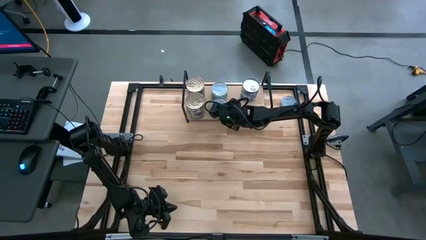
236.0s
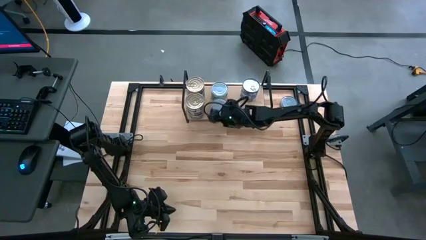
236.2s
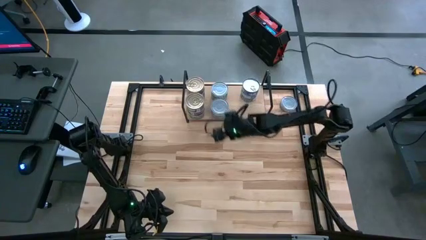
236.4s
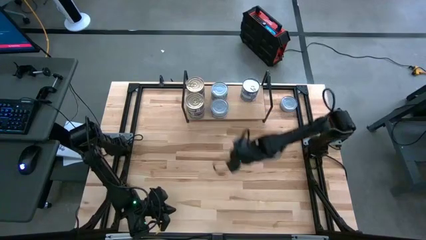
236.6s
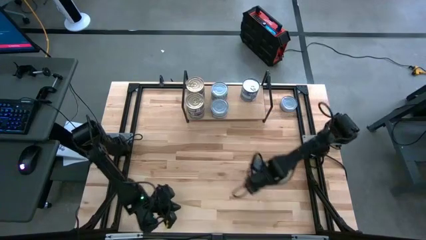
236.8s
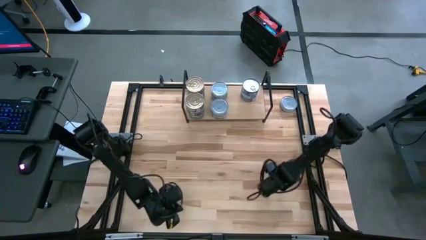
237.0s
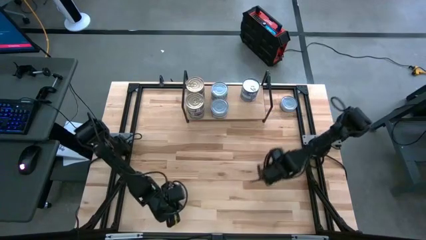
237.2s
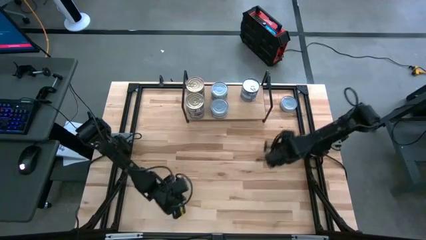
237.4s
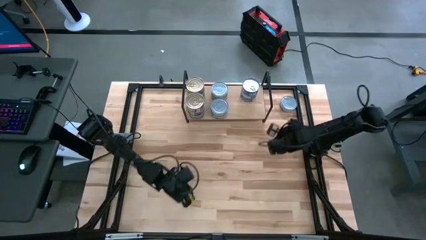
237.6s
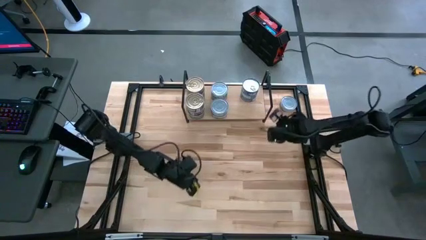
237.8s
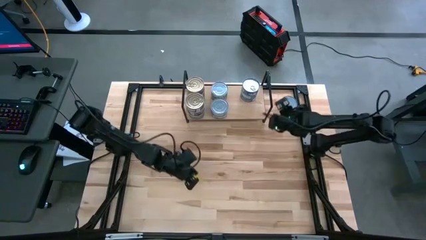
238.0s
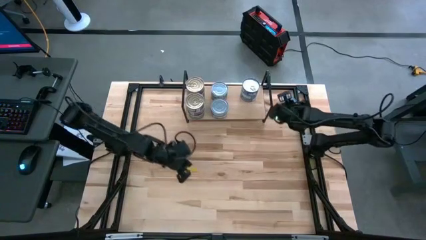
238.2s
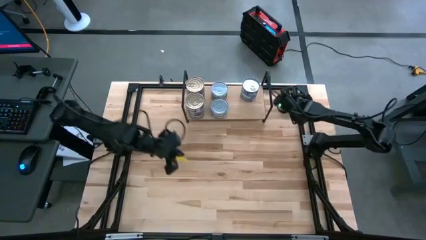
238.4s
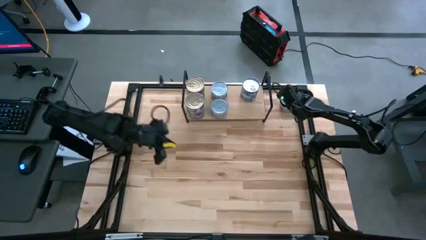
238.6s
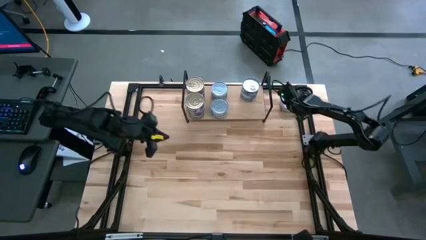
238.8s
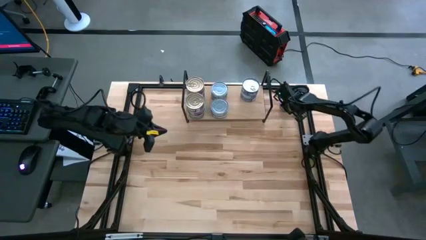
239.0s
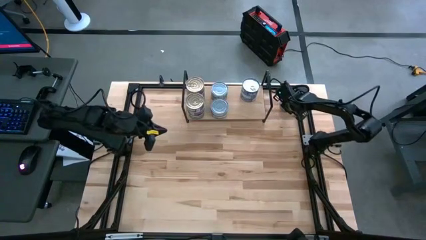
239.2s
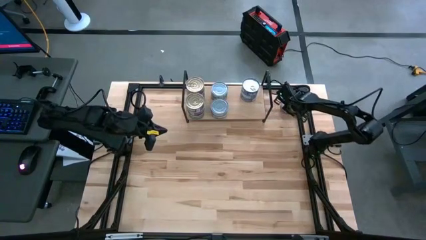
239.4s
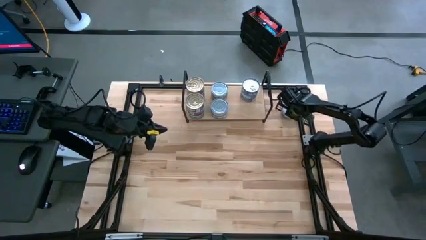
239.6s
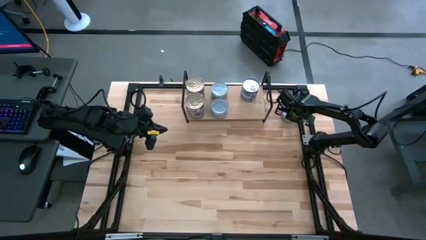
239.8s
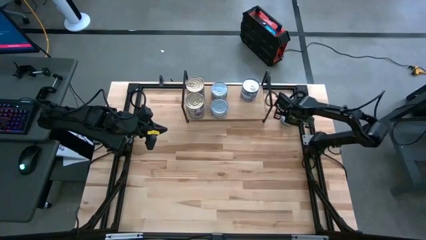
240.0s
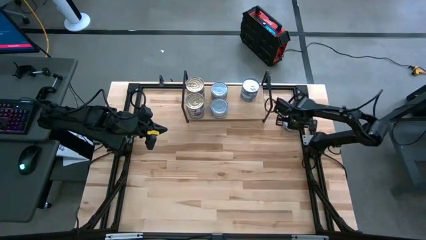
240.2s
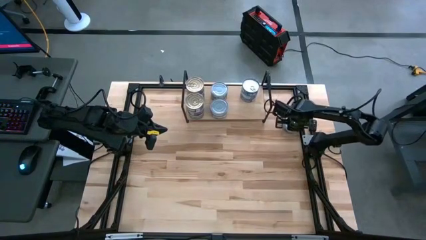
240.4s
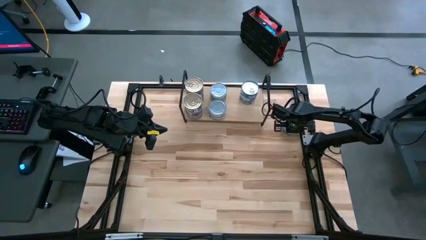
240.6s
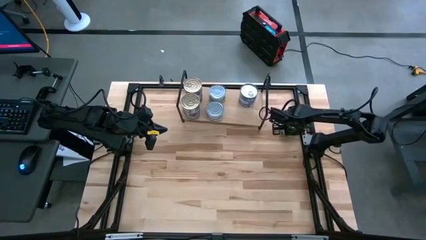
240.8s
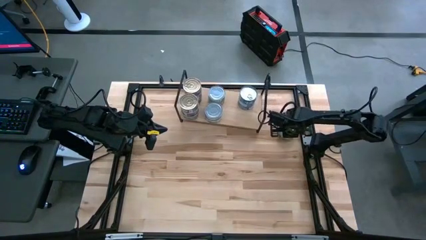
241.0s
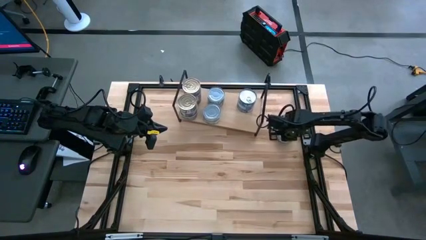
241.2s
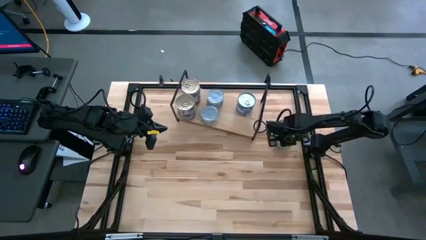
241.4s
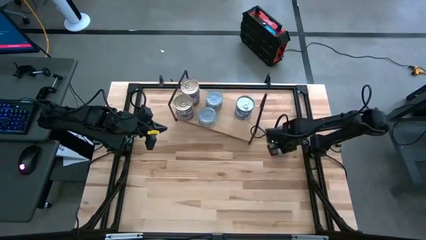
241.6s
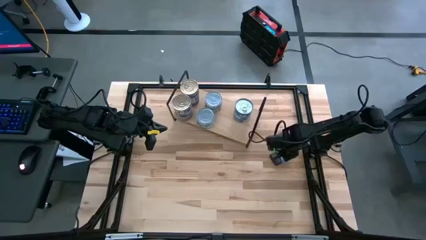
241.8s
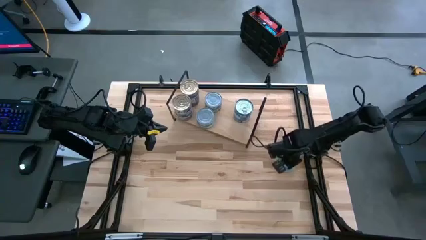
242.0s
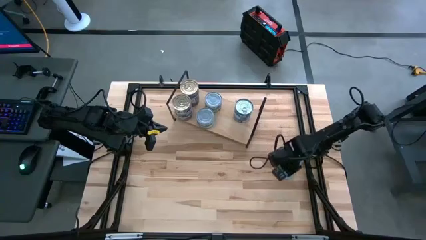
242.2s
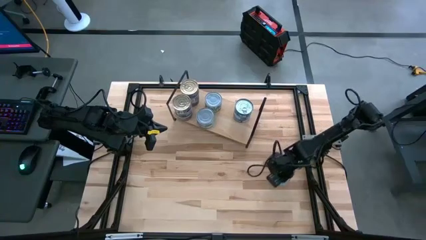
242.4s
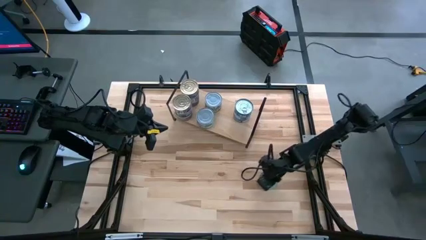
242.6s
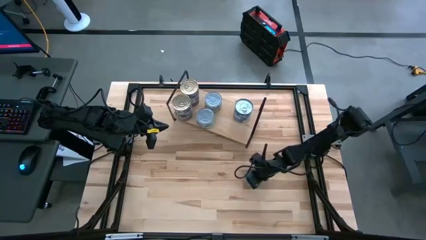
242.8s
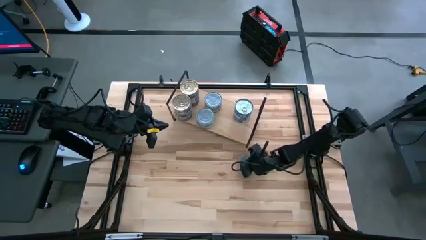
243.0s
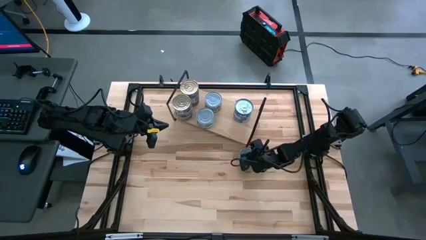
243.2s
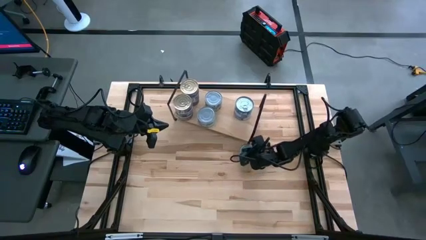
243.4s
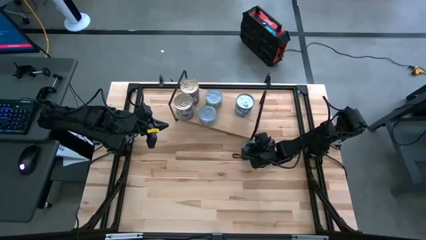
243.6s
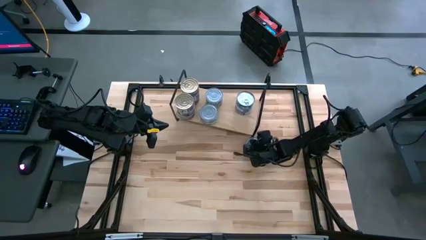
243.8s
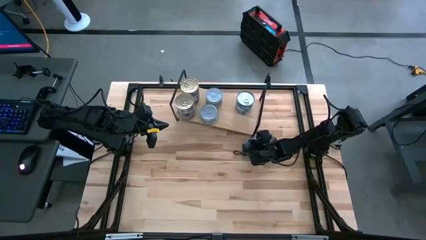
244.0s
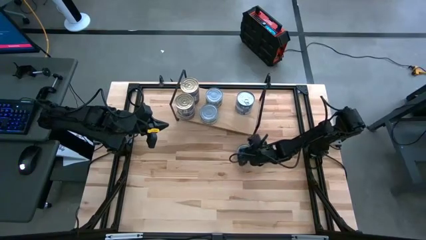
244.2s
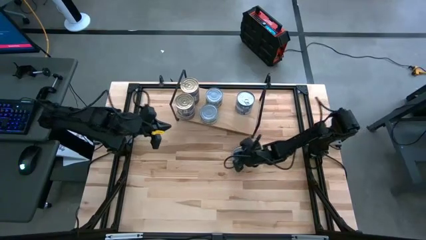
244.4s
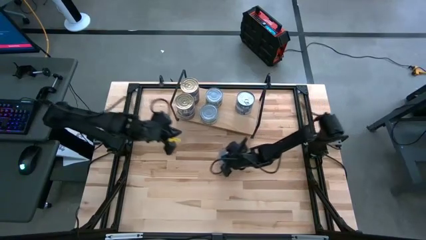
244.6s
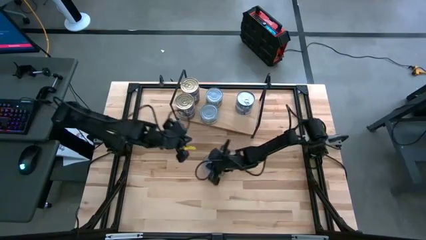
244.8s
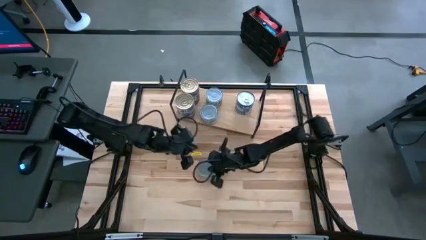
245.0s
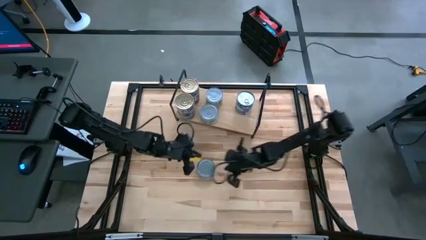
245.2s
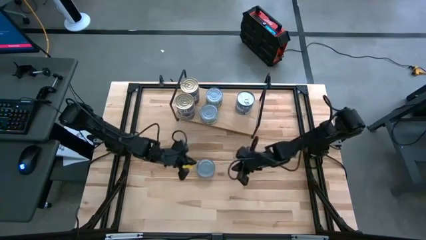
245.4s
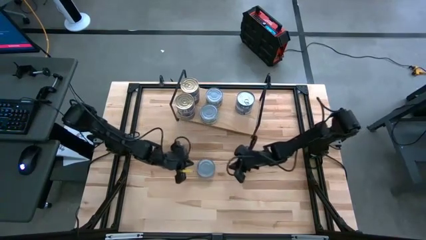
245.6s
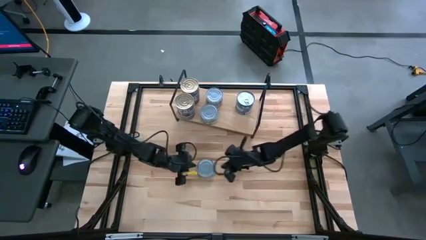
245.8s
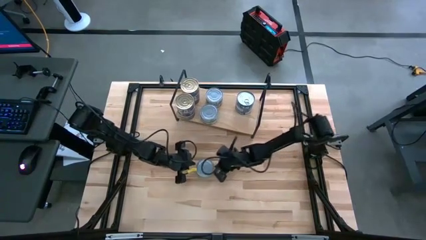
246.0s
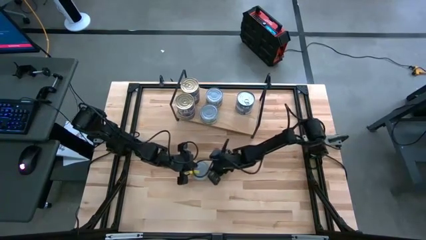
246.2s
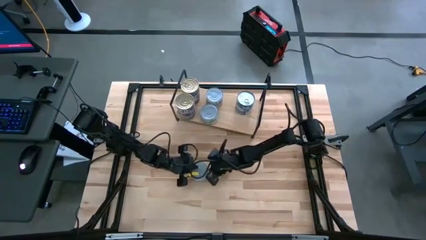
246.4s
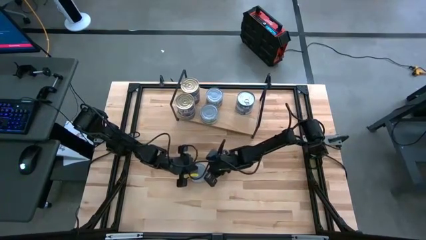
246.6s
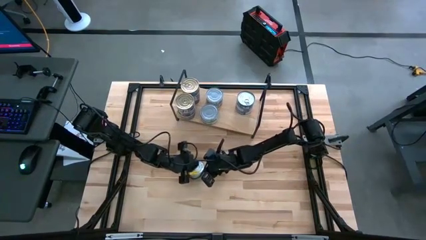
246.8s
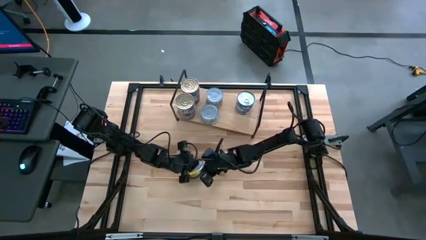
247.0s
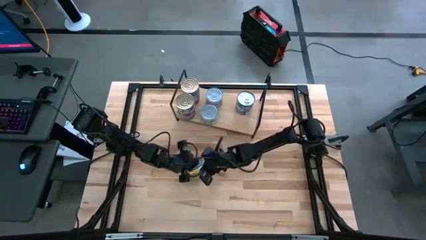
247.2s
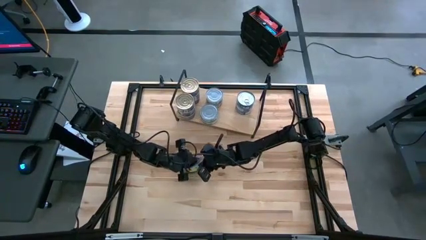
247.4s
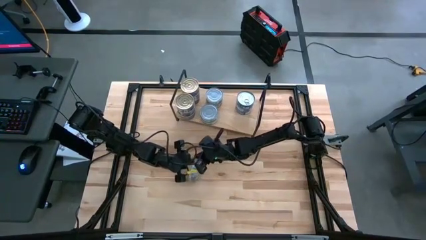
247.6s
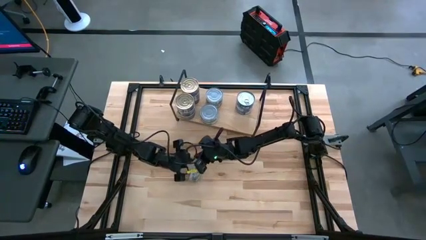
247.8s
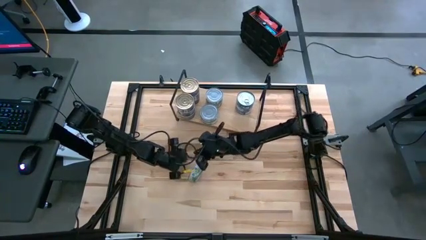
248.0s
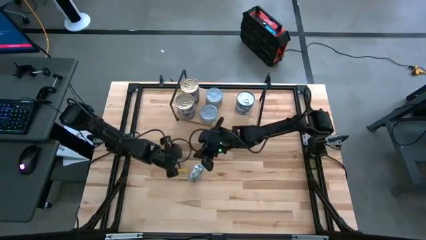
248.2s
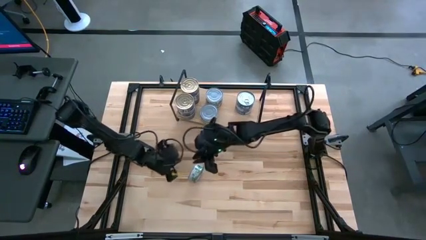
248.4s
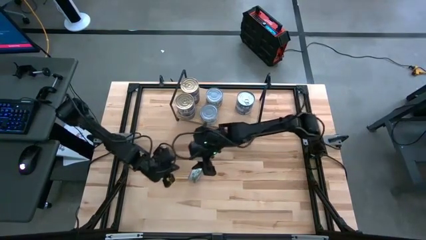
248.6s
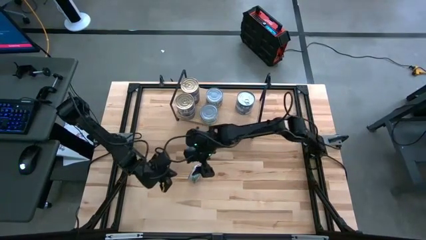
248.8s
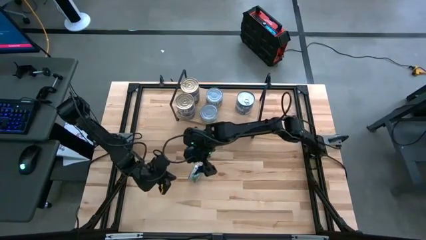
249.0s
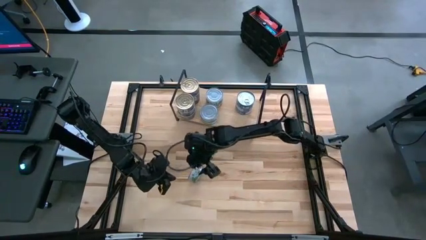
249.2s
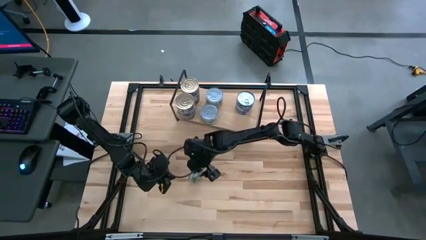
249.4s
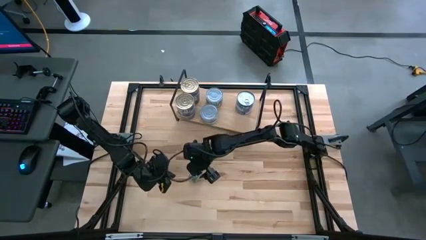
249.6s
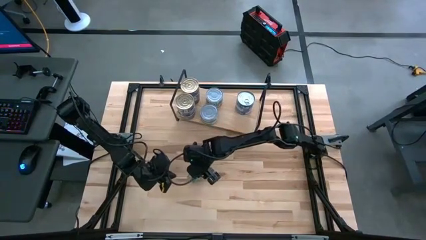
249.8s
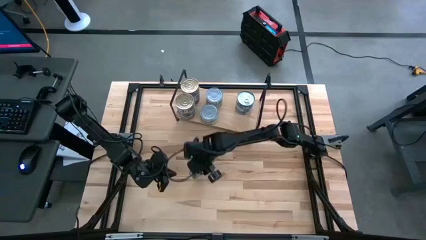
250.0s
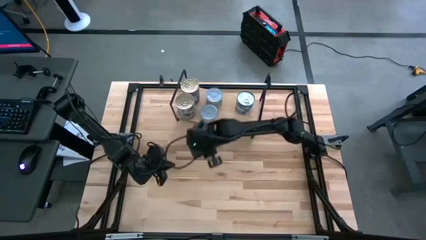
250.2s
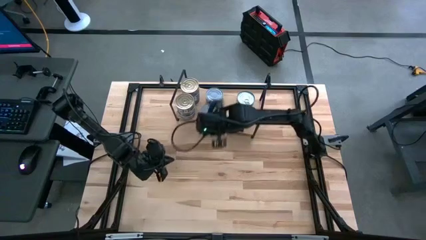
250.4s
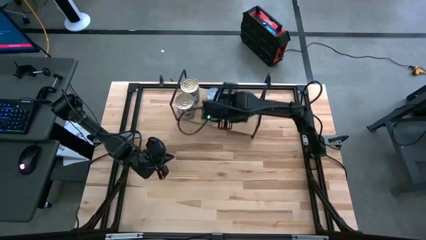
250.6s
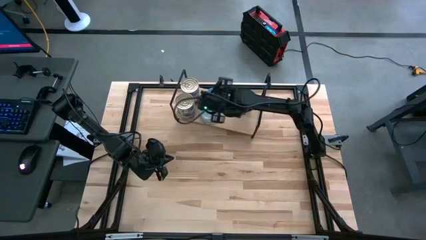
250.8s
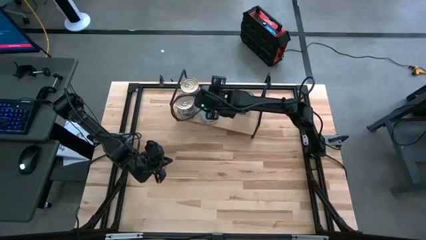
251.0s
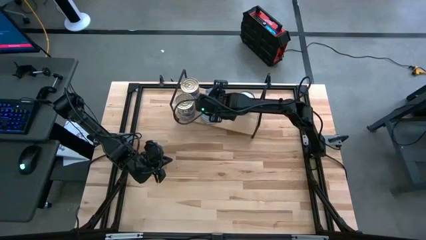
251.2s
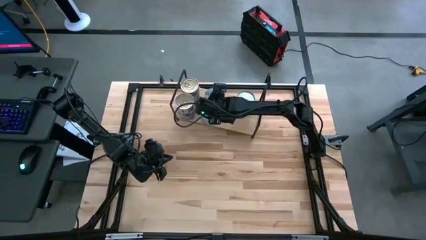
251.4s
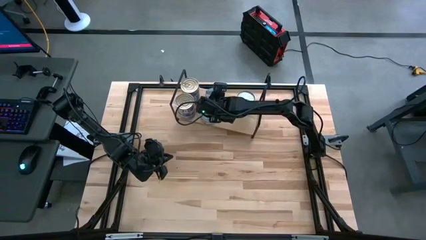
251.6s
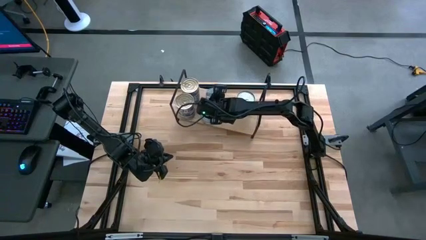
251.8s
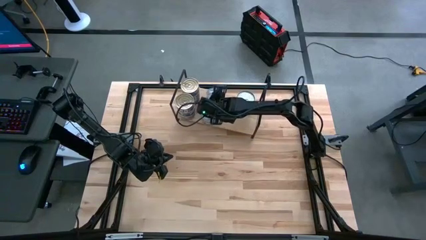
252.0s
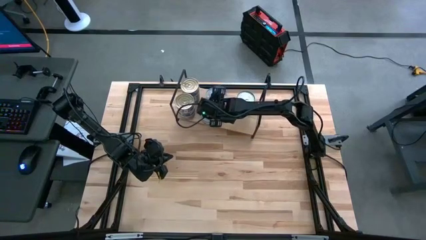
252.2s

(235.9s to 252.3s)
Task: Stack canned seafood by type on shelf
Stack the green white tuna can on top of the other green white tuna cans on the shelf
